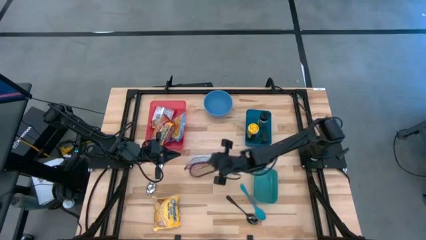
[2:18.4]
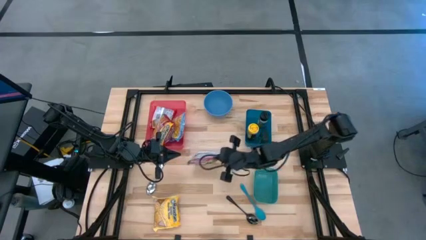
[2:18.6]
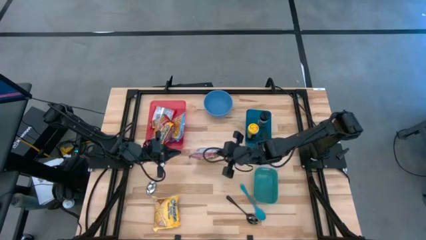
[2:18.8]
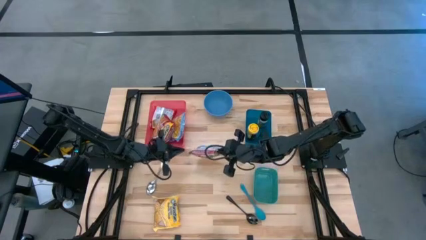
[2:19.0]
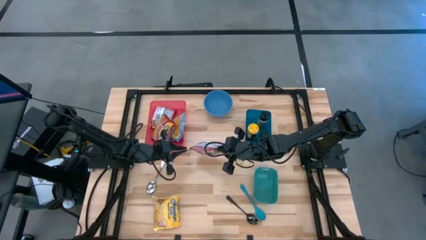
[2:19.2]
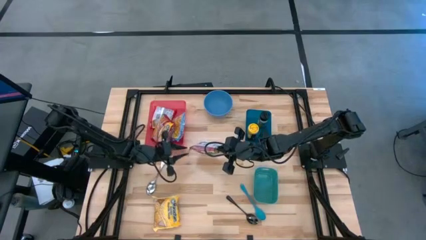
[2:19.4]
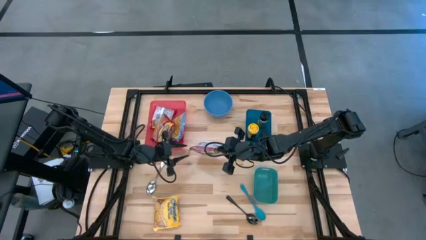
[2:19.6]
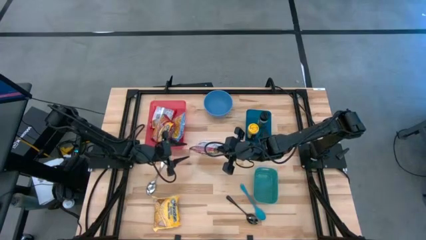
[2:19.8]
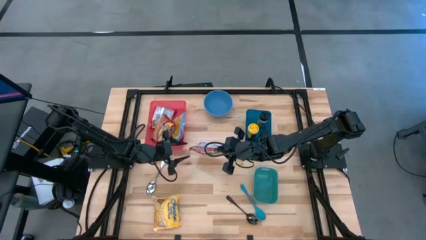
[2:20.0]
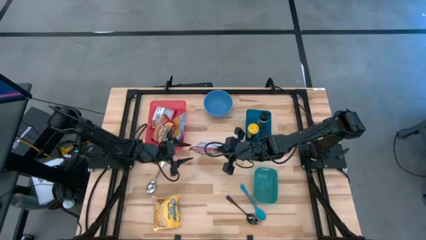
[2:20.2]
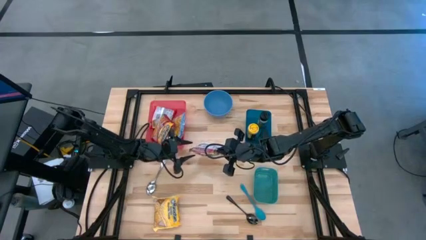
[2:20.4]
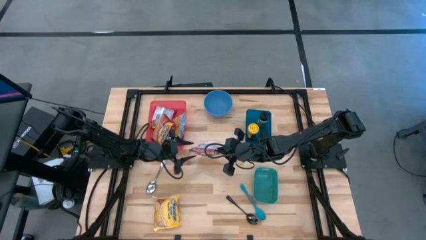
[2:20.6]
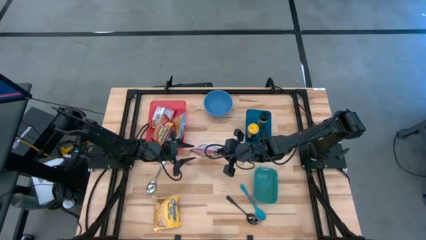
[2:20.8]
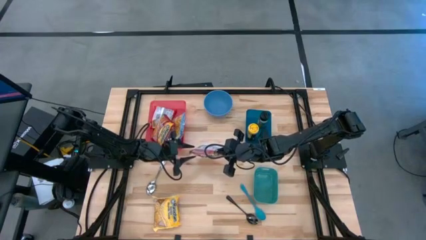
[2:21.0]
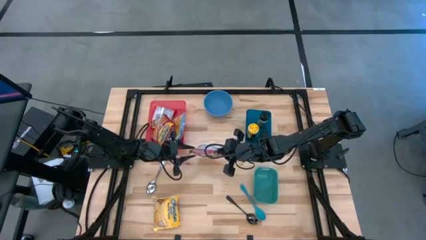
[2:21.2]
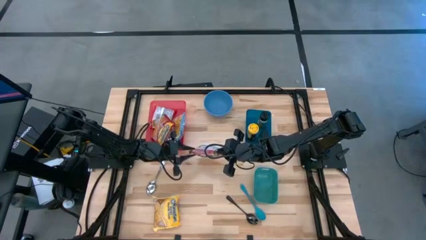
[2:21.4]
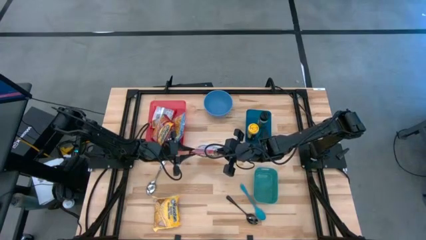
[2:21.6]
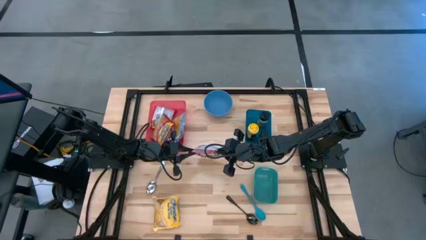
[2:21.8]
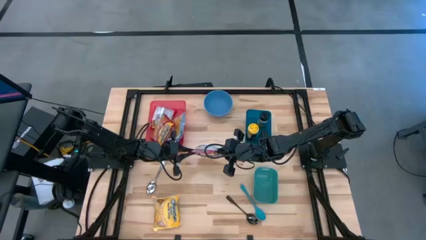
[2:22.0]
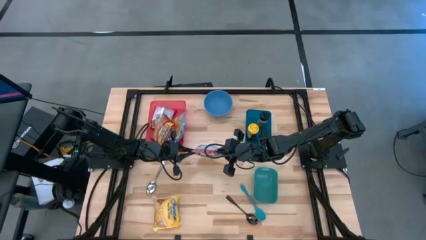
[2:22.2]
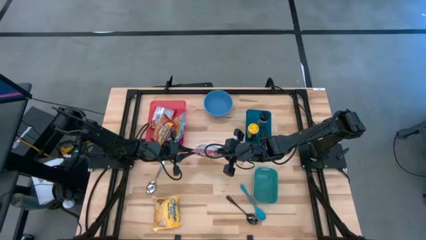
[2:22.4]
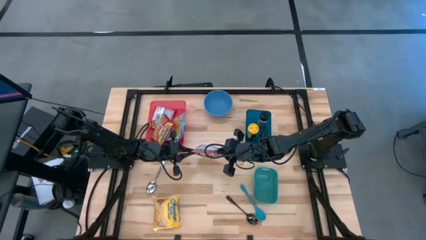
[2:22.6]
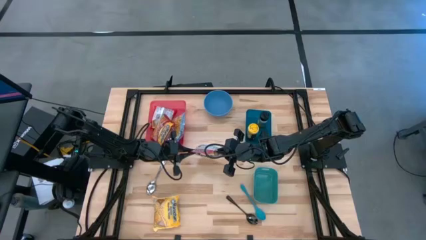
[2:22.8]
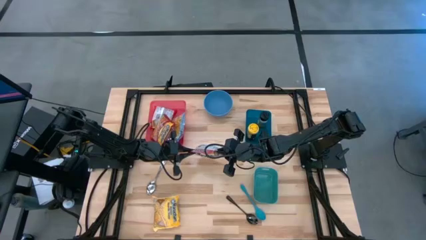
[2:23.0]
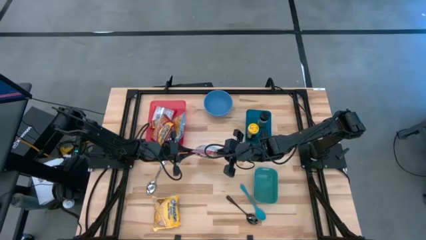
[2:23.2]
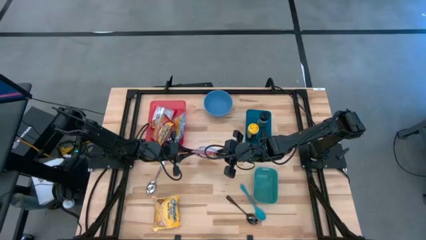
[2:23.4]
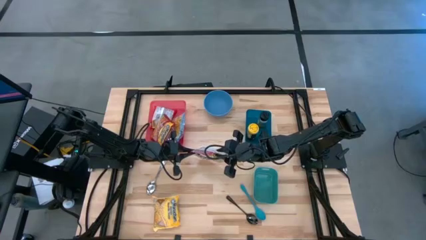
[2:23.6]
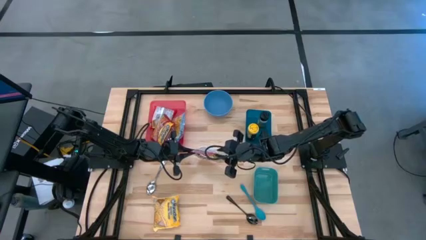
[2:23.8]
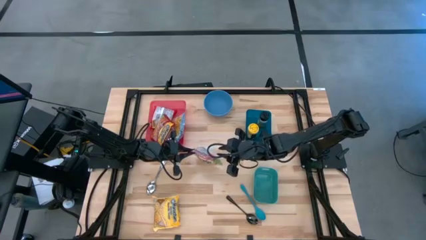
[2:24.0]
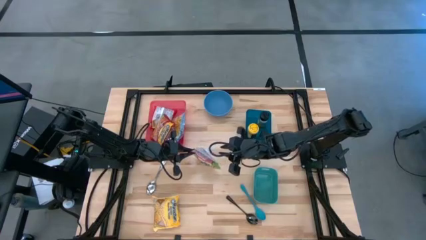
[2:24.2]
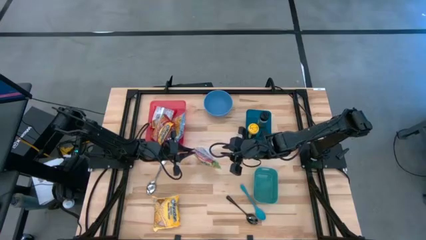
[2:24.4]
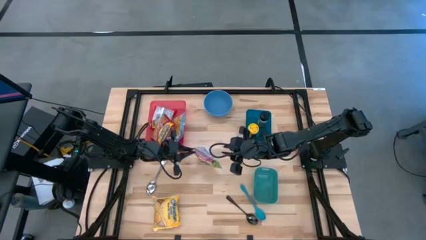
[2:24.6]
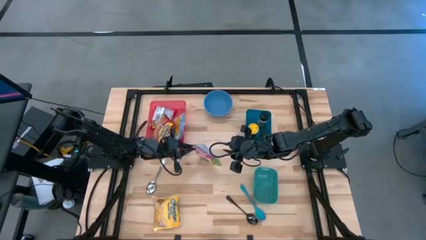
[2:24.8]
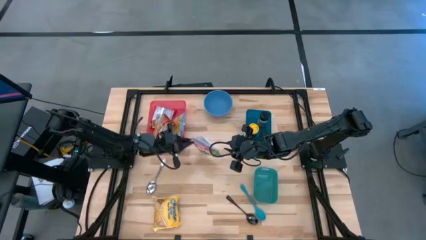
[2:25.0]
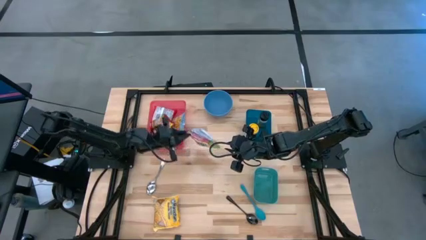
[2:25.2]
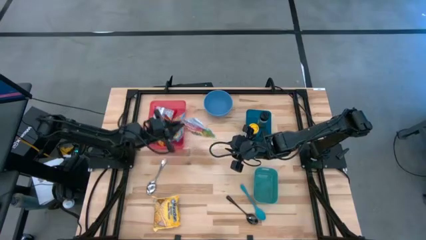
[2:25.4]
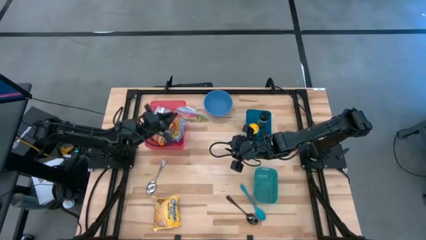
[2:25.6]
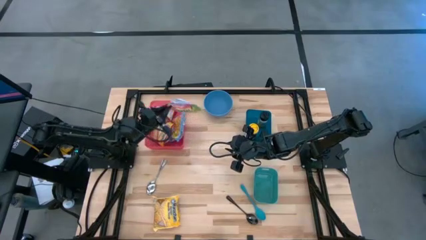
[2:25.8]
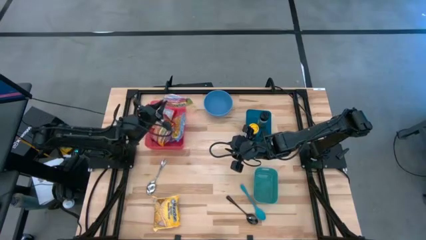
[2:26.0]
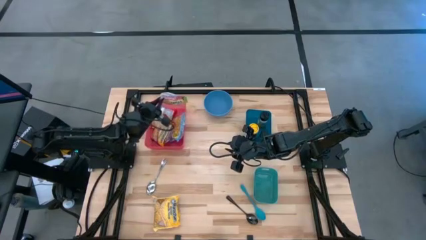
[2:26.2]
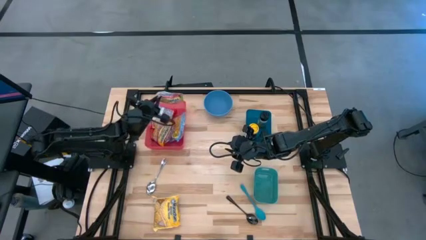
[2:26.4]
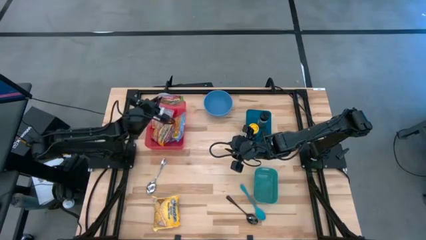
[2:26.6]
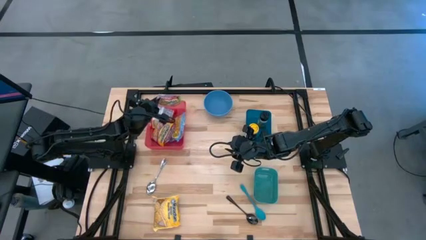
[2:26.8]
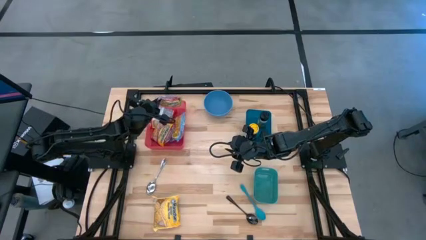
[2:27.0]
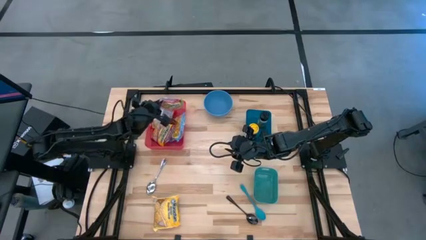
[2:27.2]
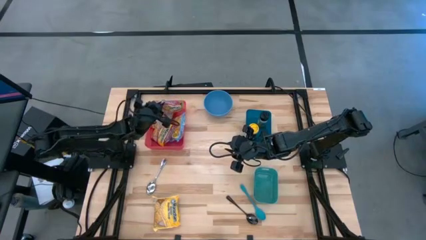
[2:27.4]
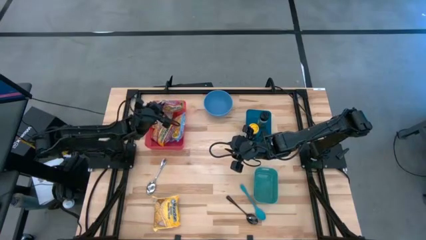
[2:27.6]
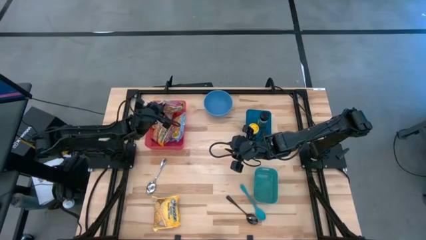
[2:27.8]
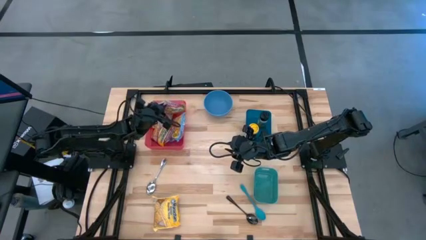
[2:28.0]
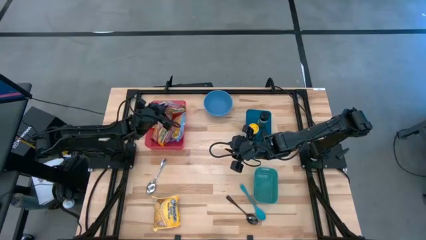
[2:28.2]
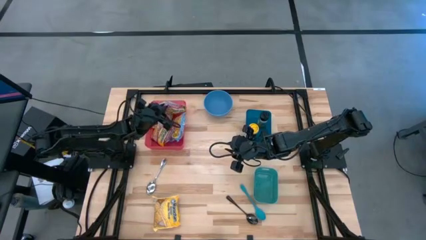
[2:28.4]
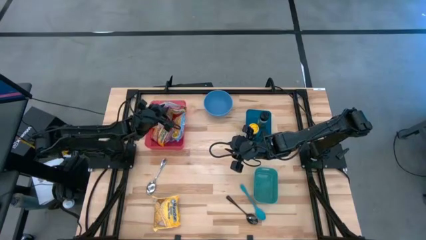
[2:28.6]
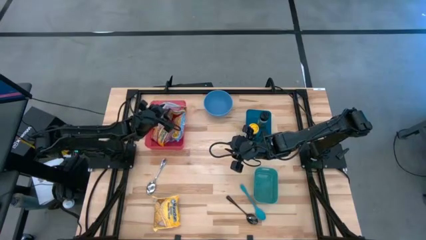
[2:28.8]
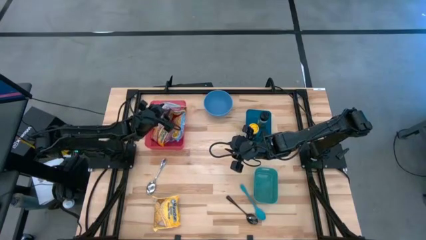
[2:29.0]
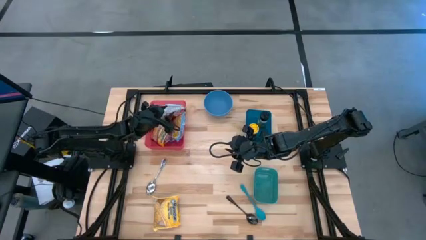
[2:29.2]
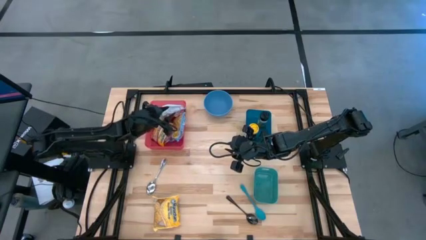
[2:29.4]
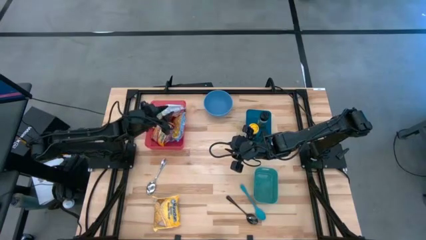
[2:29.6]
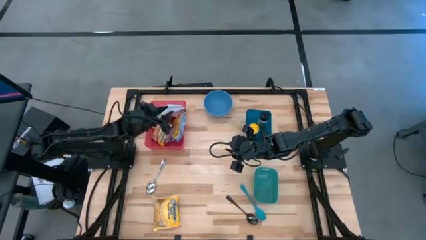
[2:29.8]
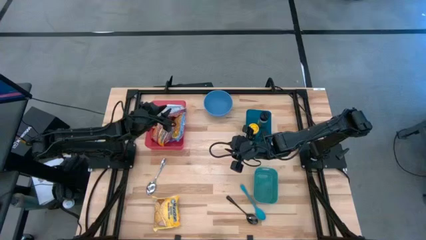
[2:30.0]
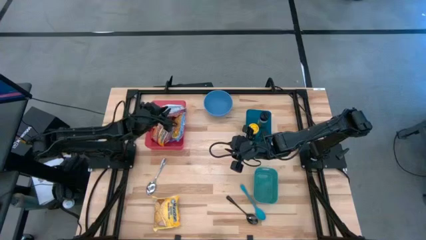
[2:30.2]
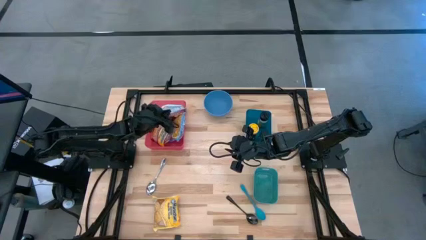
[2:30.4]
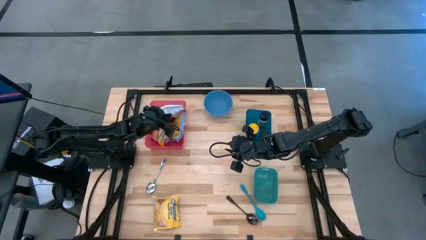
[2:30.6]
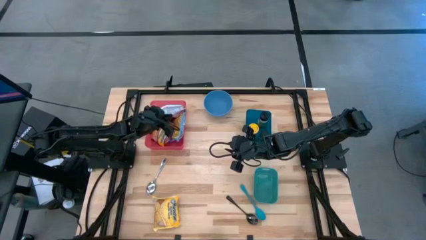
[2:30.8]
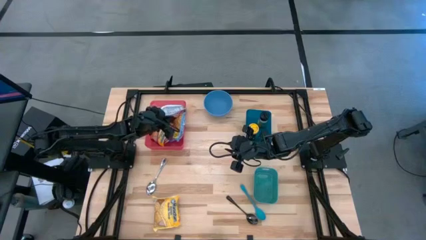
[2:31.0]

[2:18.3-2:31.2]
Task: Pick & Place Food Item
Put the green noodle pack into the red bin

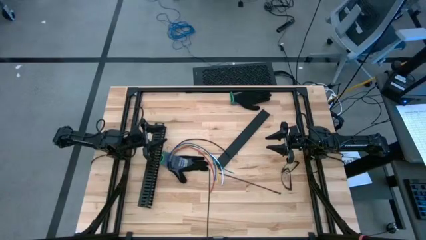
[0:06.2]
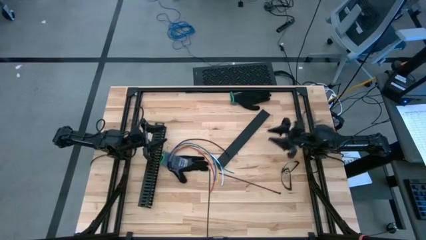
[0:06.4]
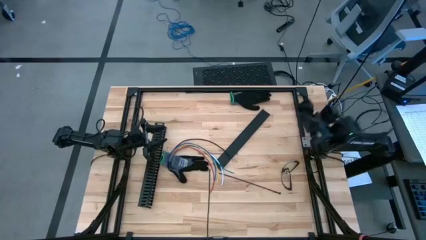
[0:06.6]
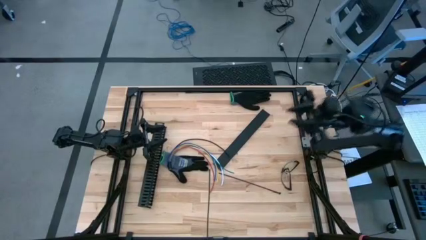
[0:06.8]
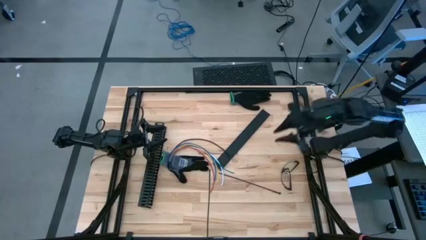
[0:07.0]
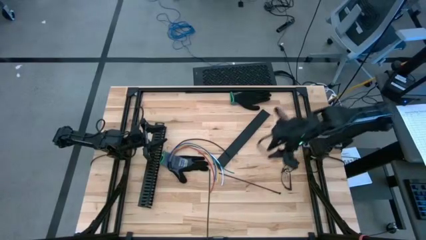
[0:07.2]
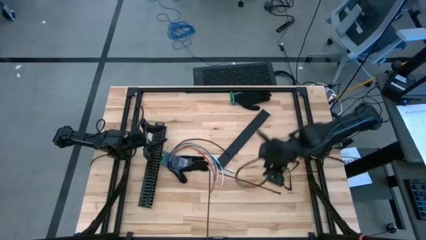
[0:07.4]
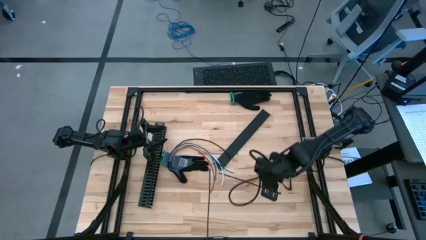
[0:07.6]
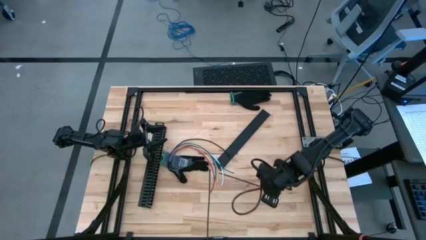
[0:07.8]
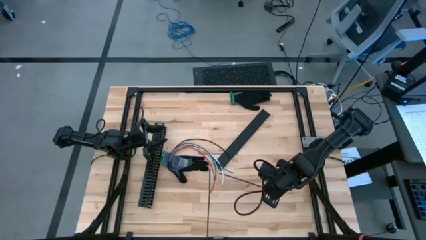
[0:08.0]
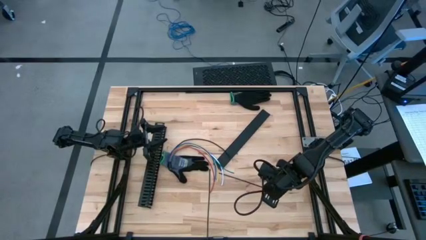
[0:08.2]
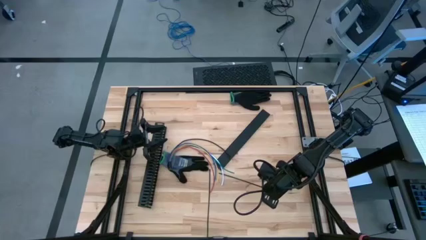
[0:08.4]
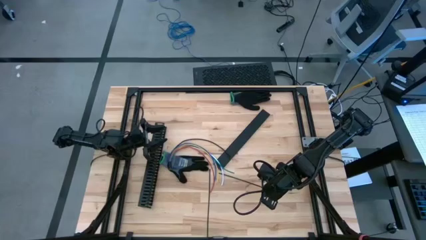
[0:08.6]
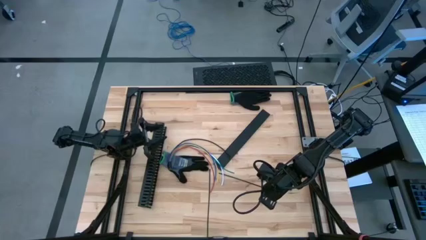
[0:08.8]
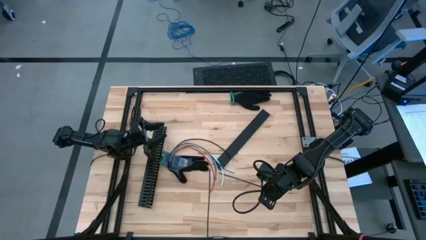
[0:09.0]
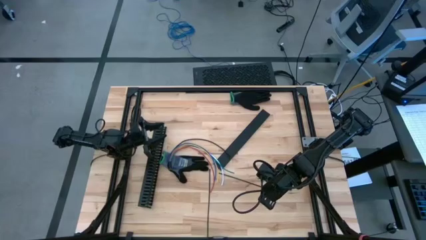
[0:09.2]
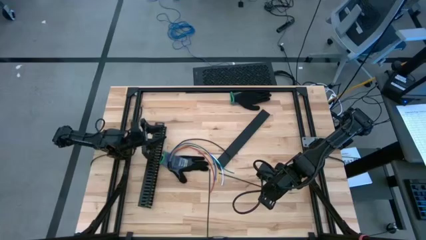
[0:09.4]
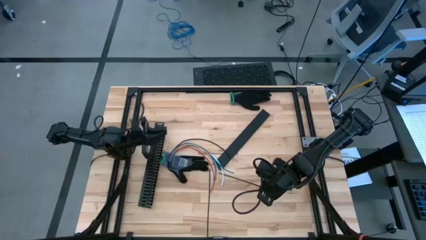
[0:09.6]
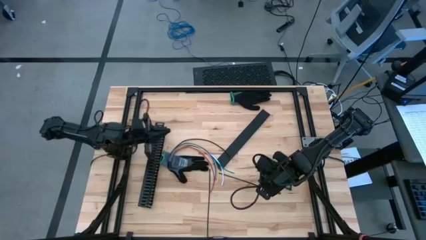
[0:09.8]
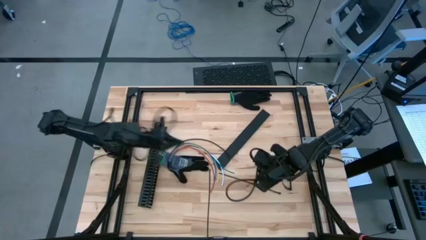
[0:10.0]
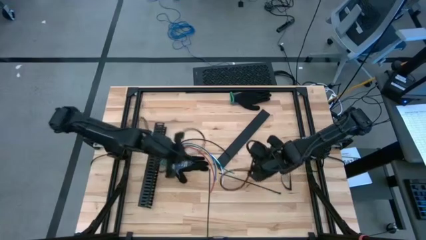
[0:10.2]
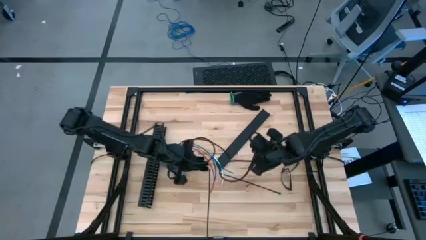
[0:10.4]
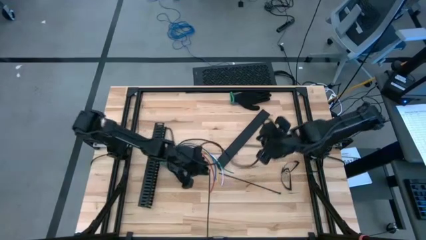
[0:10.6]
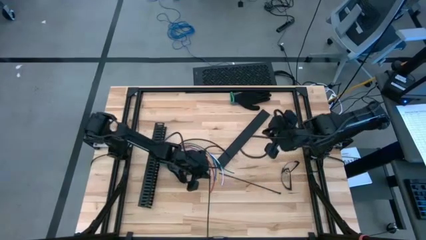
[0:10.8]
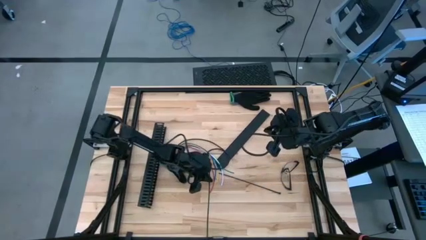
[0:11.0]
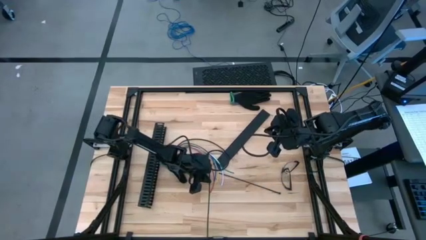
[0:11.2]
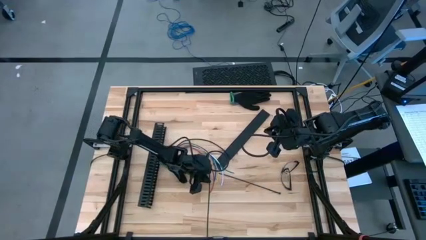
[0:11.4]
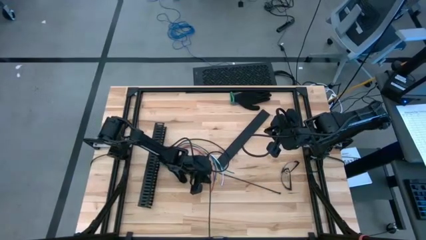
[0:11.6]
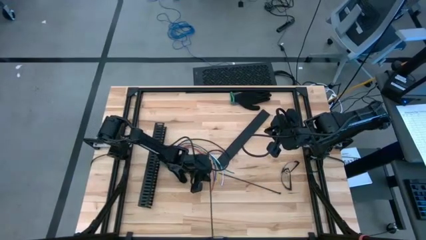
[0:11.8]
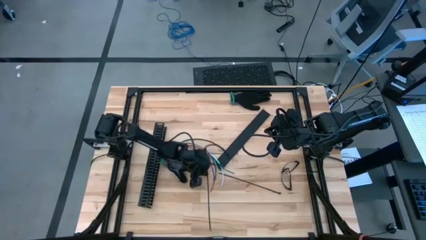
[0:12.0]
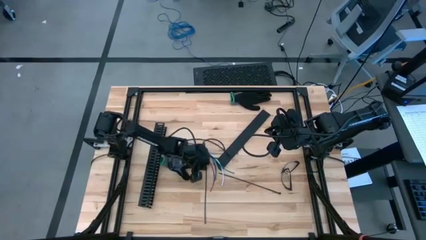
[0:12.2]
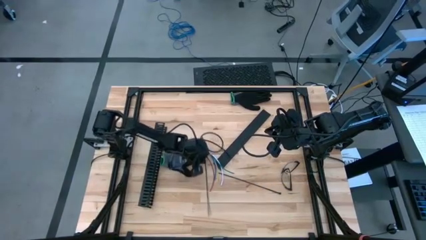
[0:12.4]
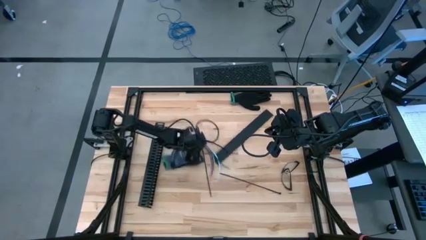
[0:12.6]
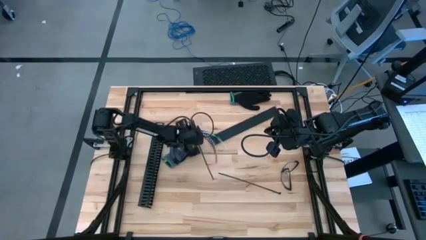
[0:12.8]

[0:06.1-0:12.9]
Task: Ziptie cables
Wrap the cable wires with the black zip tie
